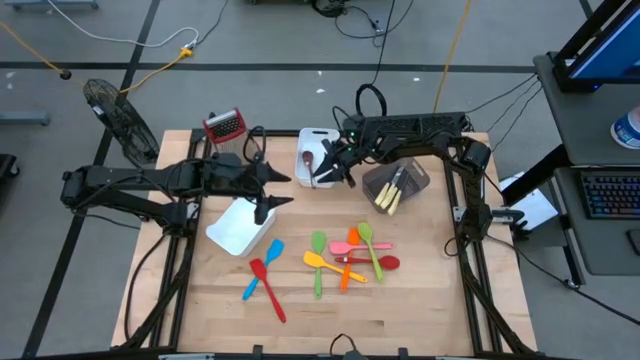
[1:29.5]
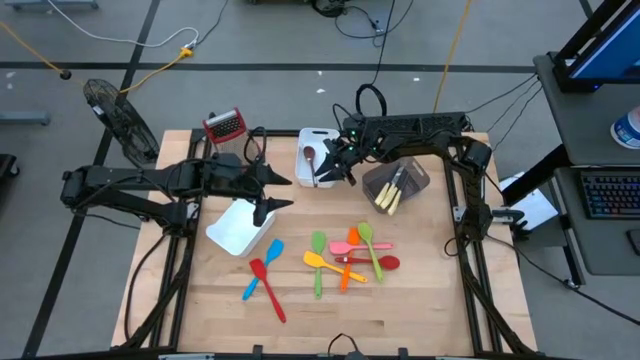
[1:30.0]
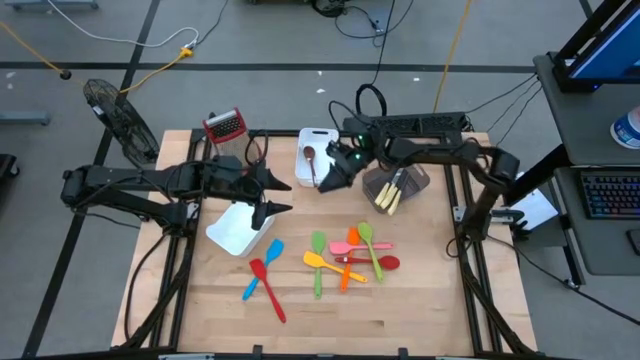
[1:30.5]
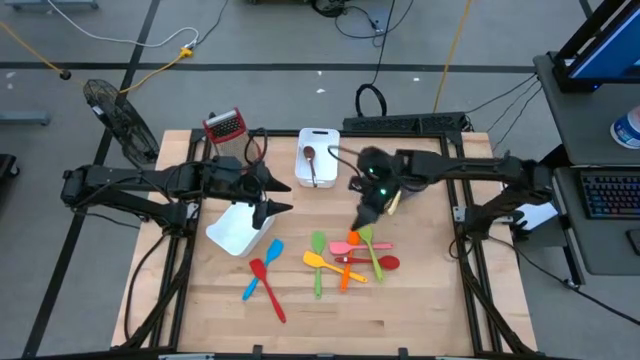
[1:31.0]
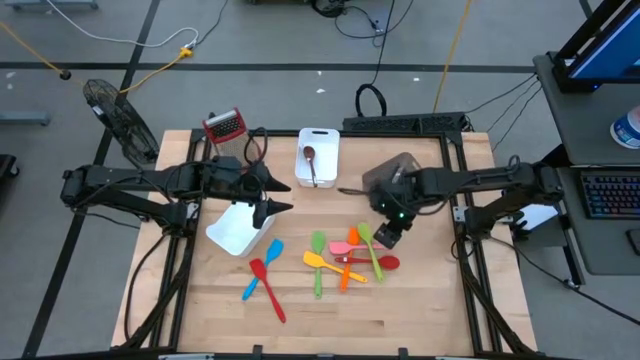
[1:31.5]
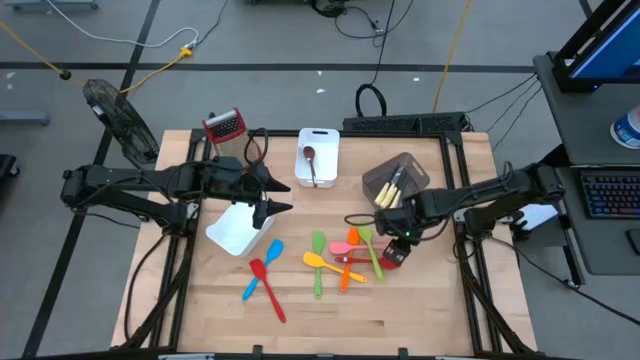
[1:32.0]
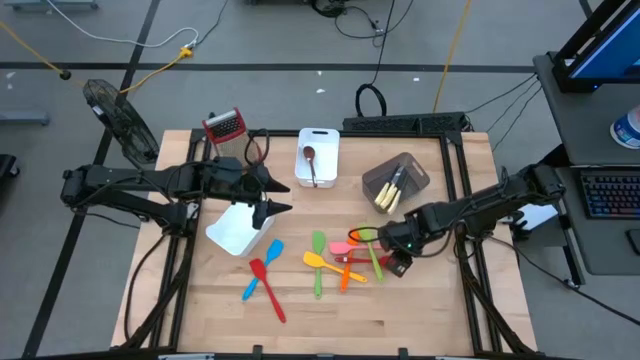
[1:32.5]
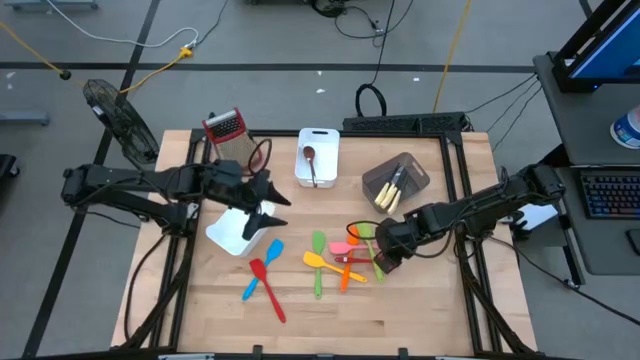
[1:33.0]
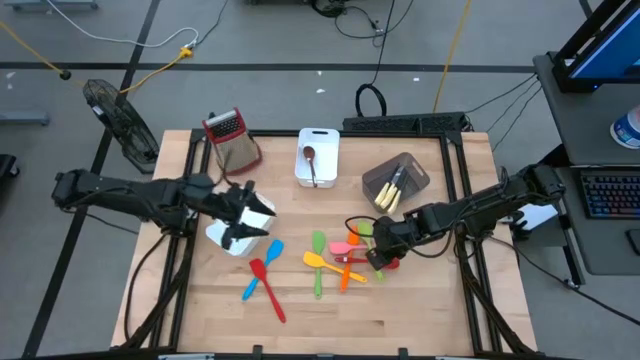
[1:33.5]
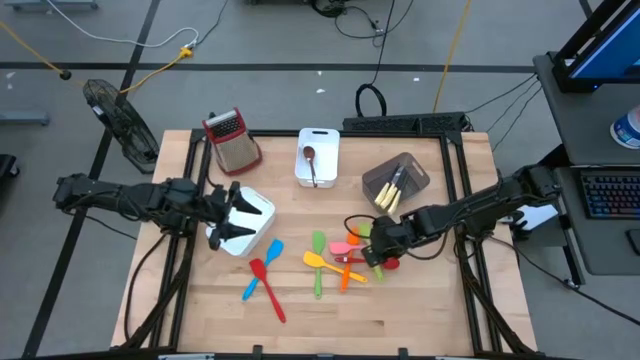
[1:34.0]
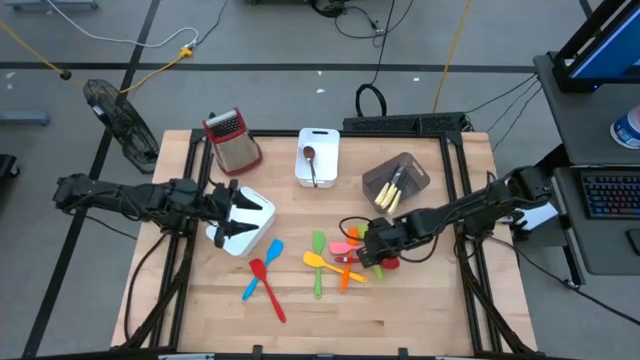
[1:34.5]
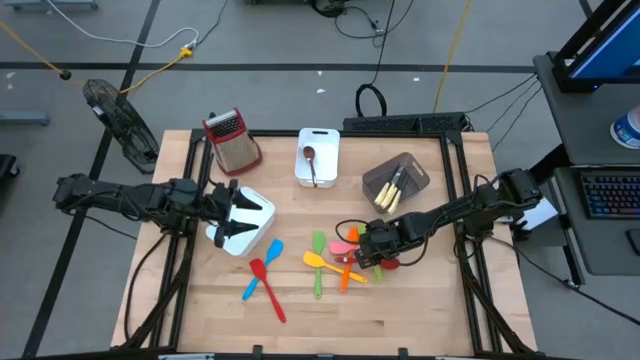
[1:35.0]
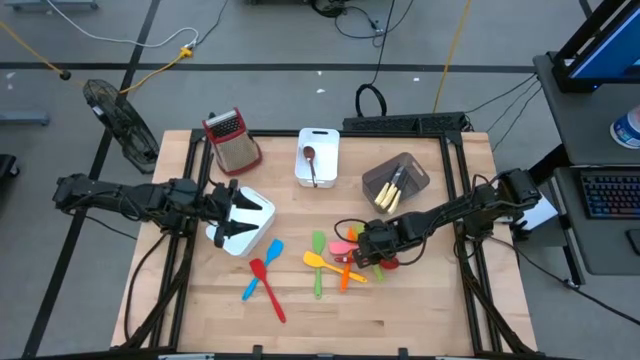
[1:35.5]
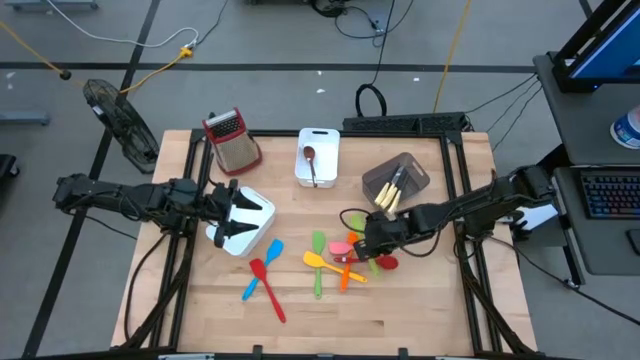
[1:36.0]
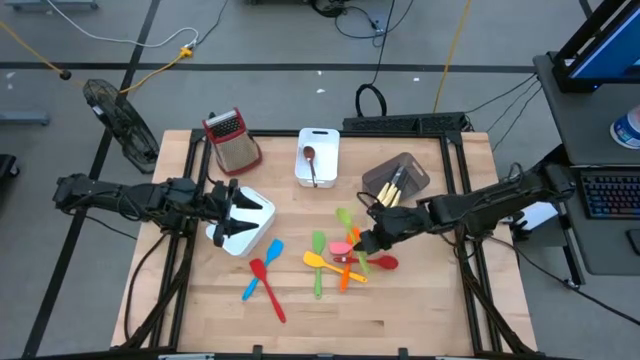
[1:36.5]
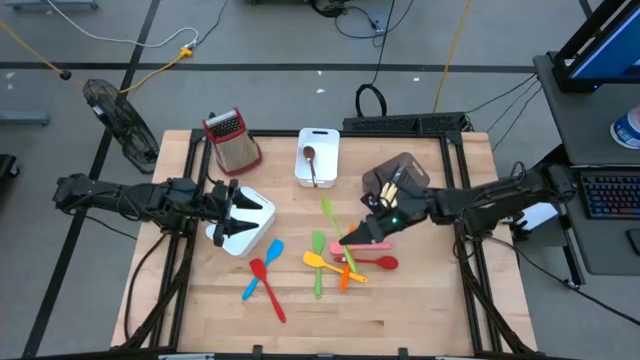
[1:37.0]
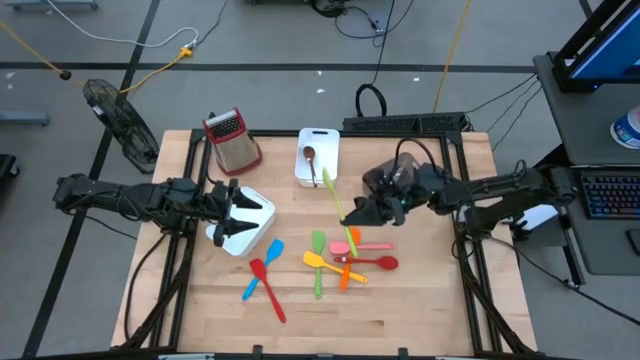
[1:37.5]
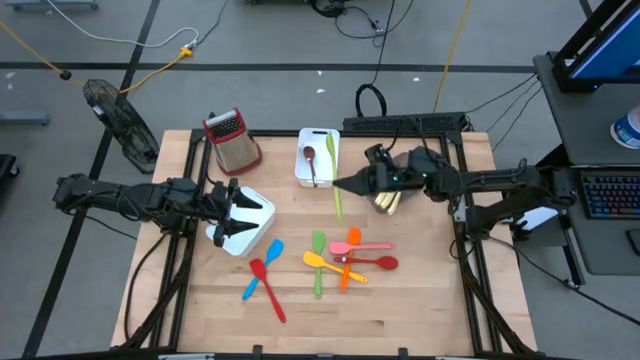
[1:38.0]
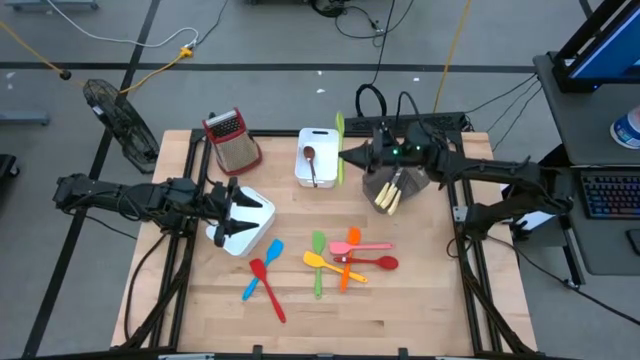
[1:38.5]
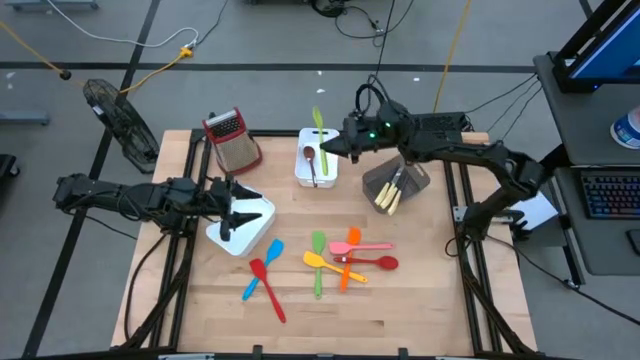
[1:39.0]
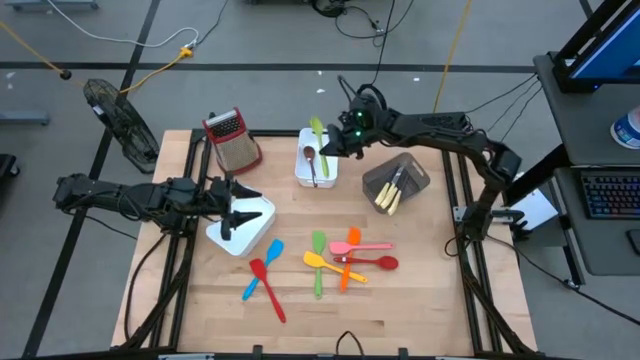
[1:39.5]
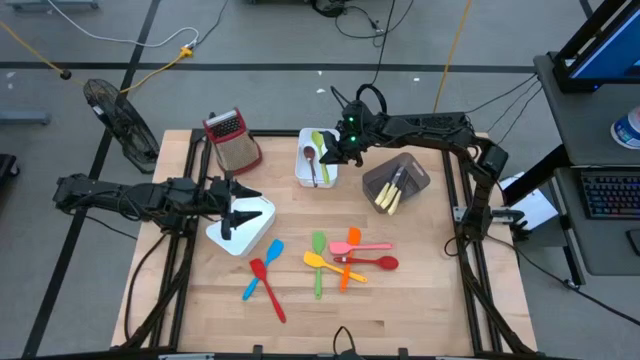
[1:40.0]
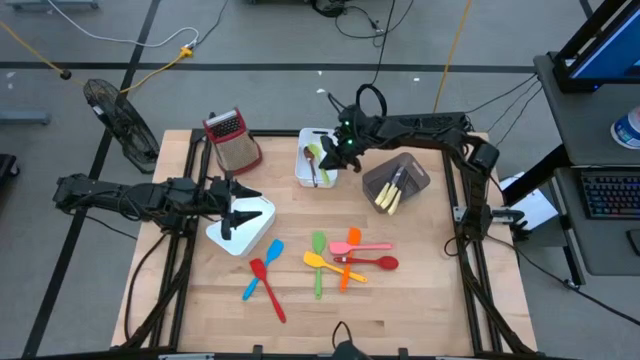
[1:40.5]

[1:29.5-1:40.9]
Task: Pick & Place Kitchen Items
Put the green serving spoon into the top white bin

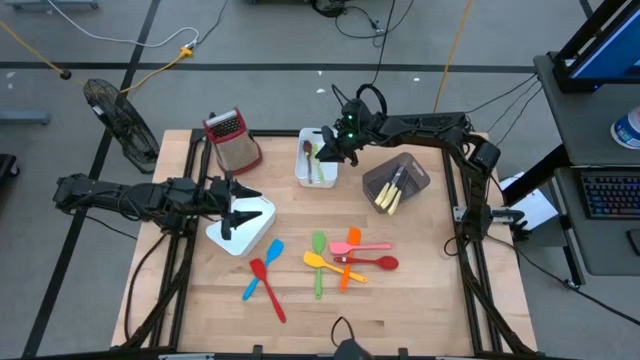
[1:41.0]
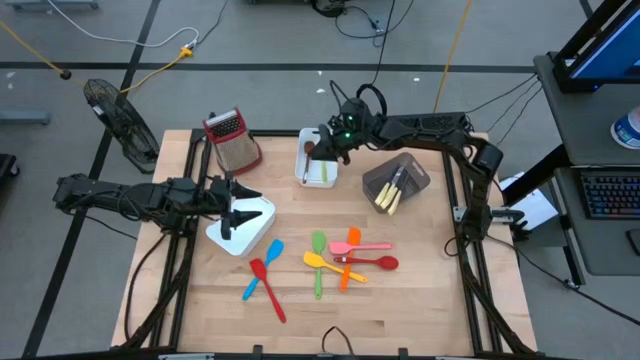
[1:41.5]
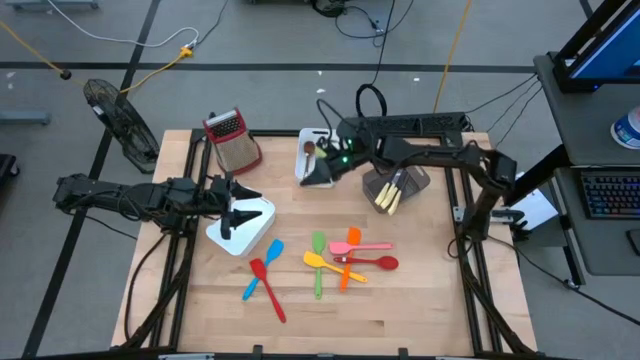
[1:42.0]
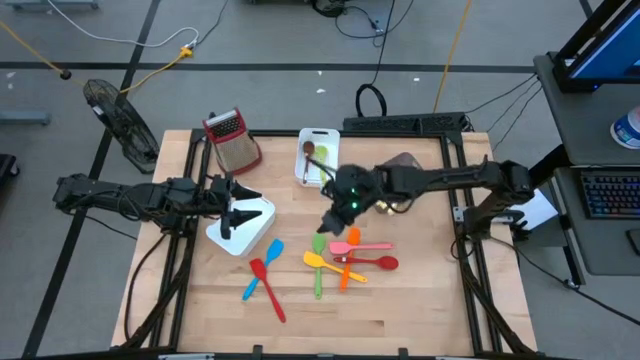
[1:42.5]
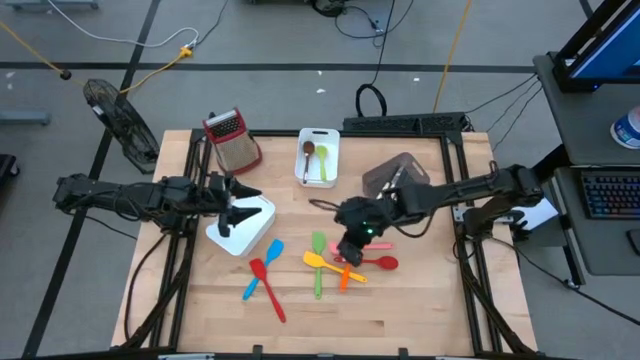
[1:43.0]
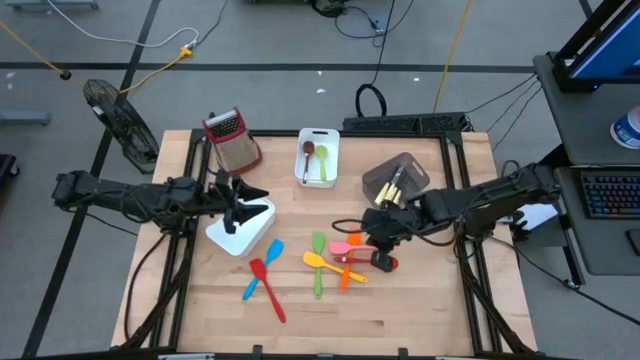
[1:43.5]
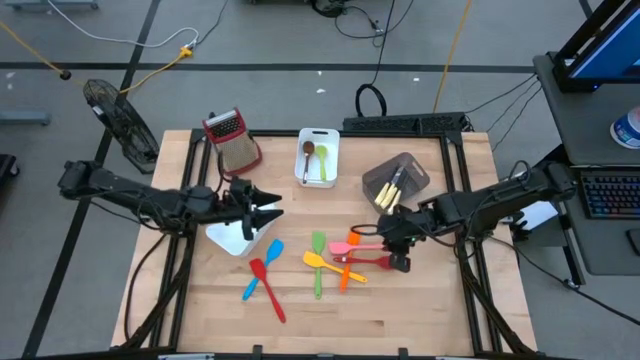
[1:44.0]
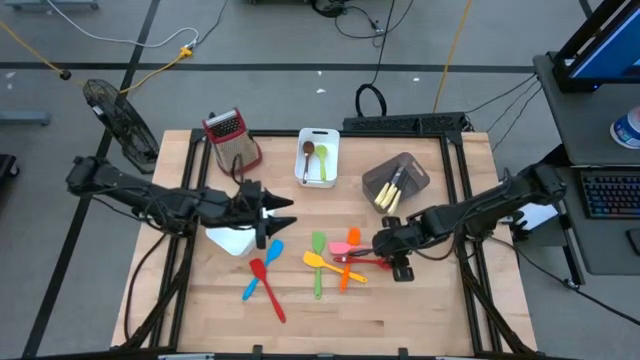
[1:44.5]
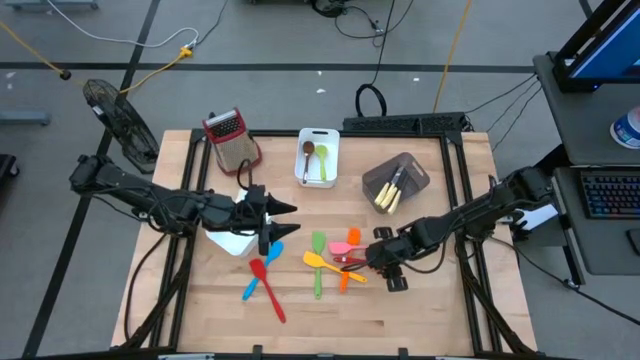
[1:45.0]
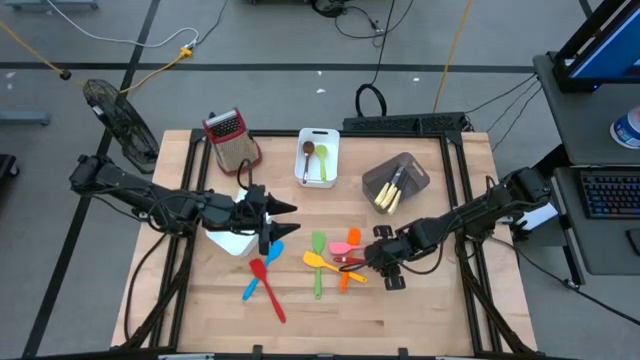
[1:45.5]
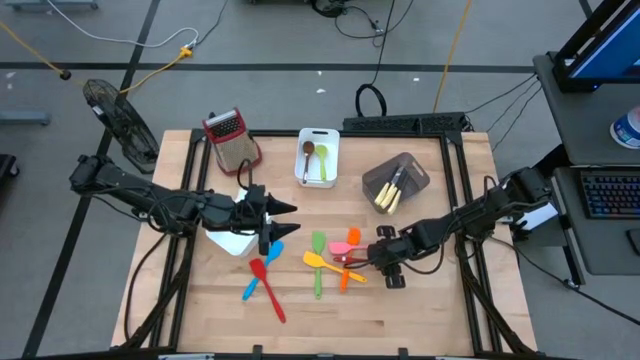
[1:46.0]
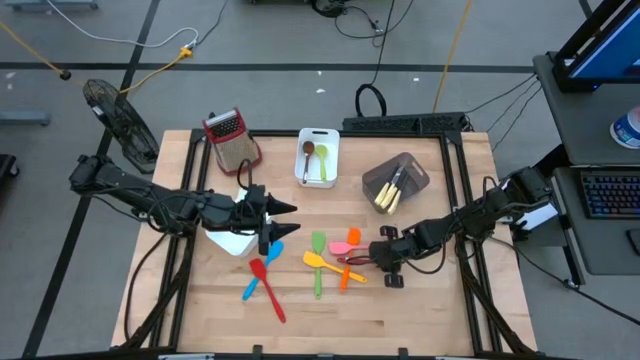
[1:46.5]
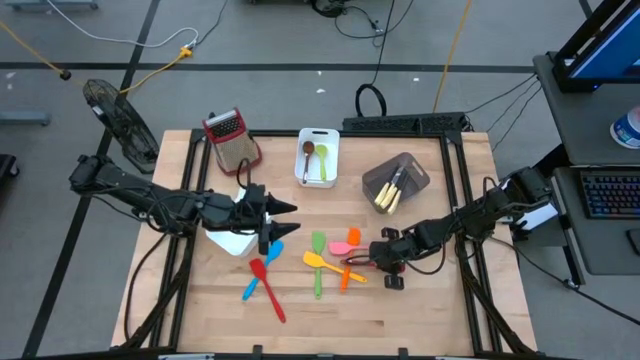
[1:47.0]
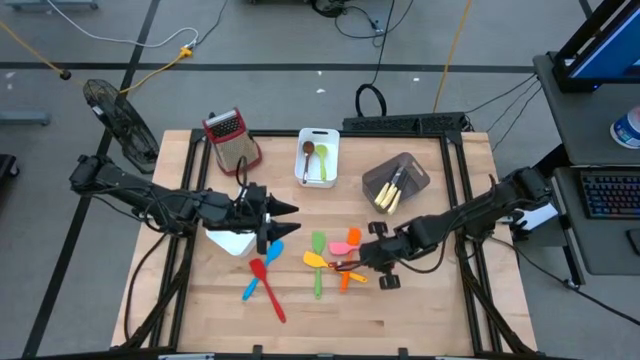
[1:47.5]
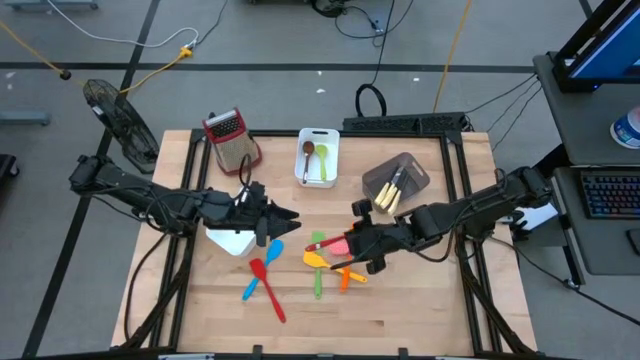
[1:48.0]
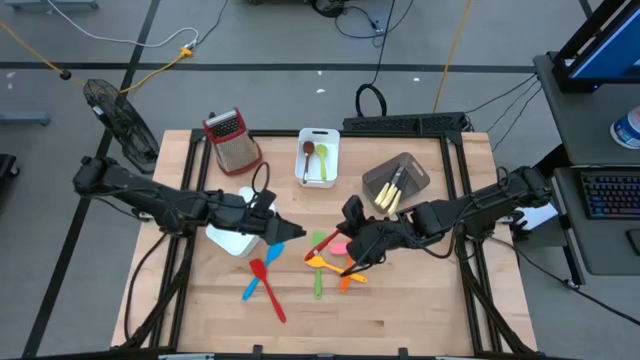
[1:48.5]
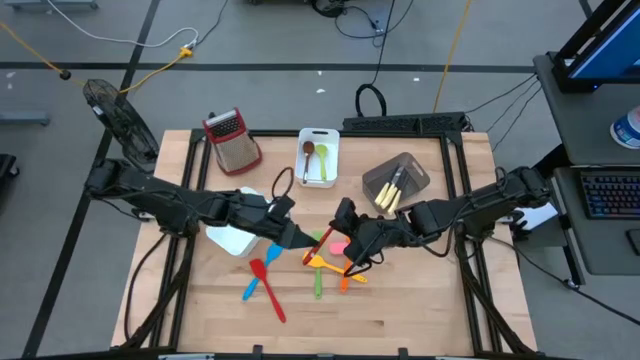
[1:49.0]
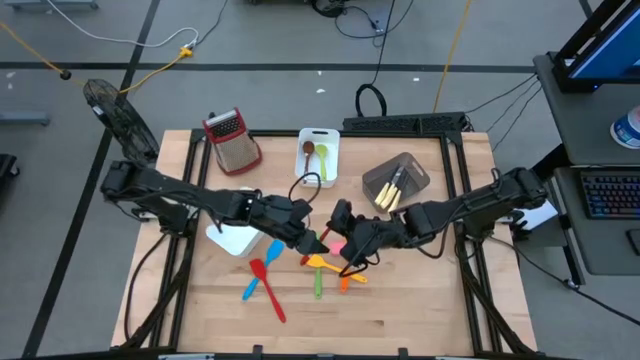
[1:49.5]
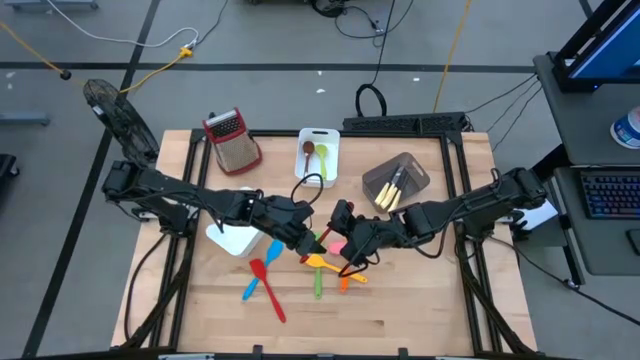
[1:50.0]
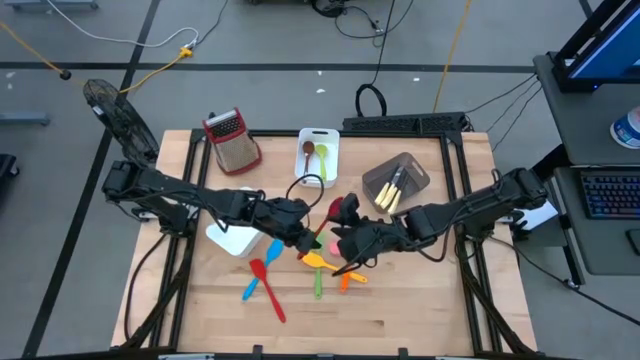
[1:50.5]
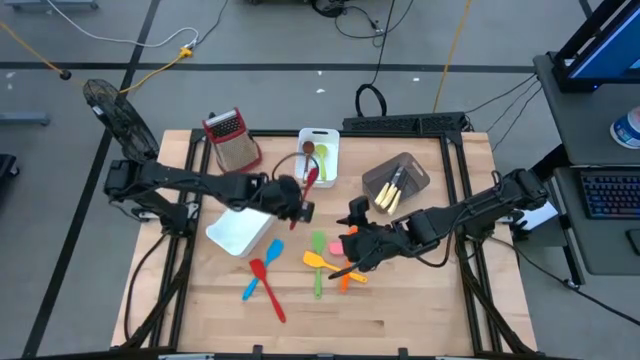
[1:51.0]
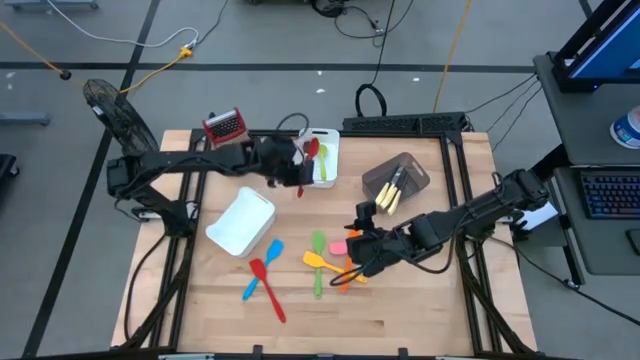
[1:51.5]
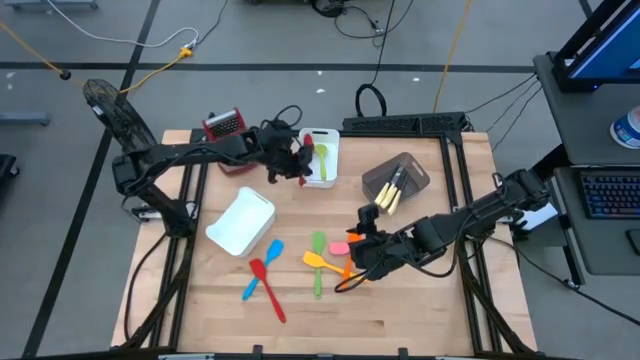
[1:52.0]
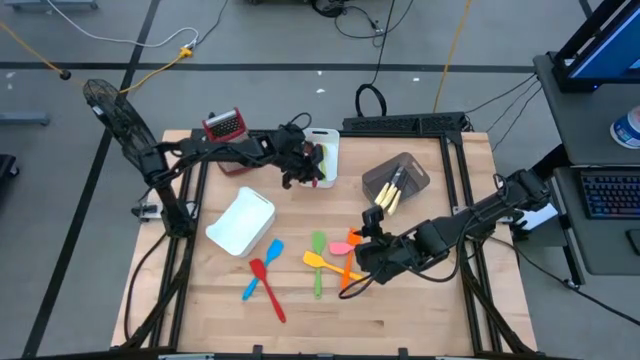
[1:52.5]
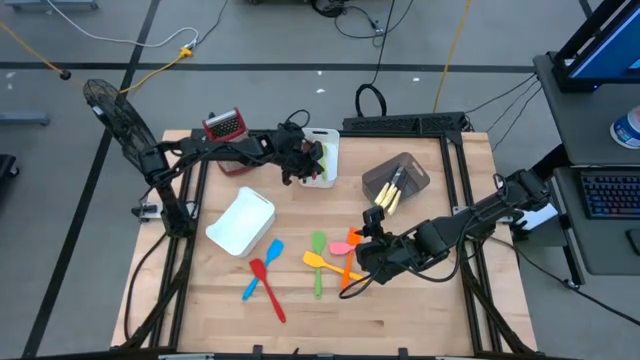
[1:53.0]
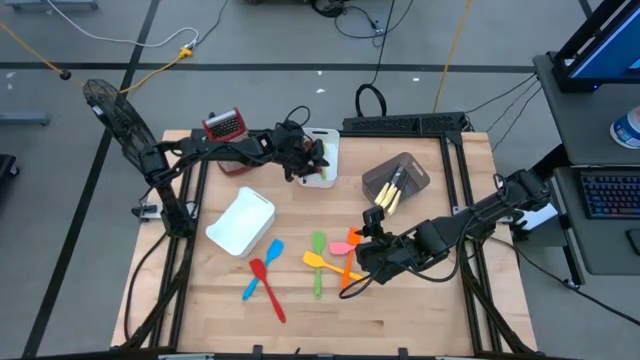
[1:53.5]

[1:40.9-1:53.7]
Put the red serving spoon into the top white bin
